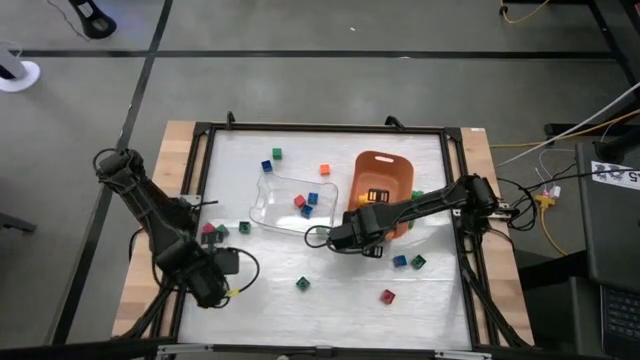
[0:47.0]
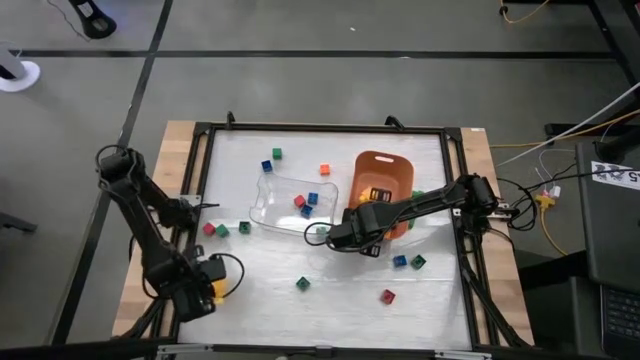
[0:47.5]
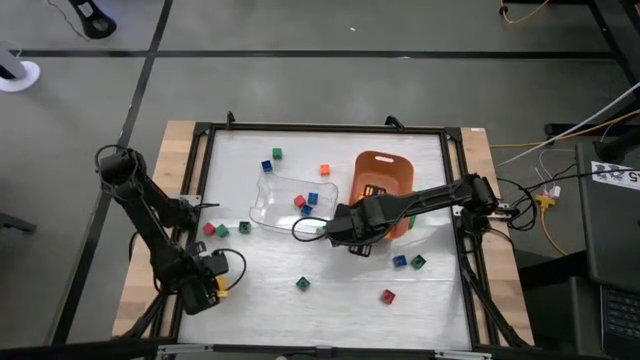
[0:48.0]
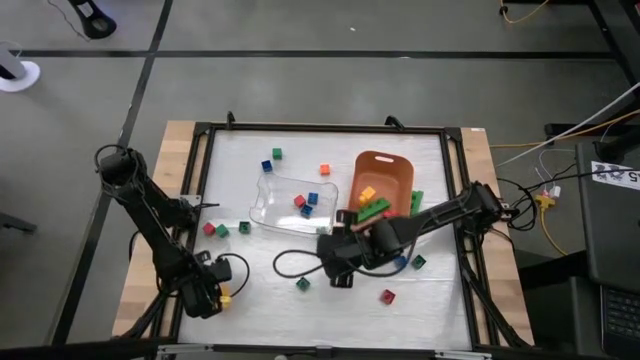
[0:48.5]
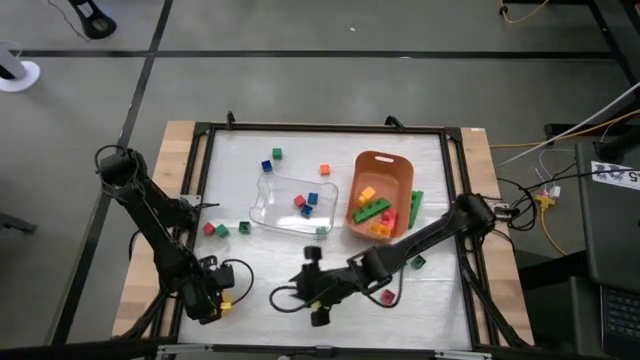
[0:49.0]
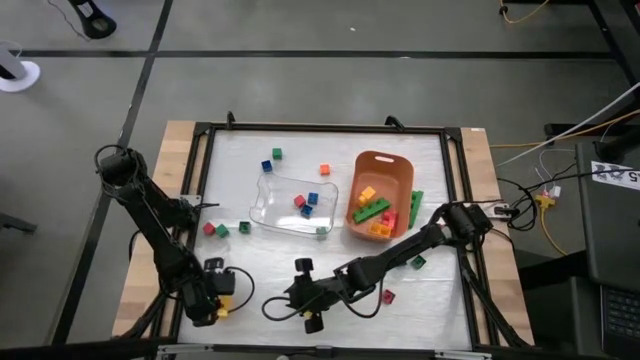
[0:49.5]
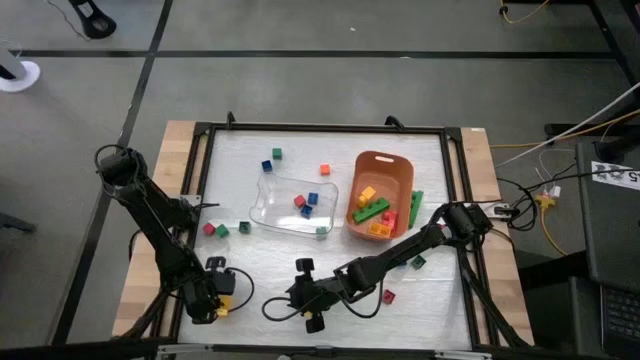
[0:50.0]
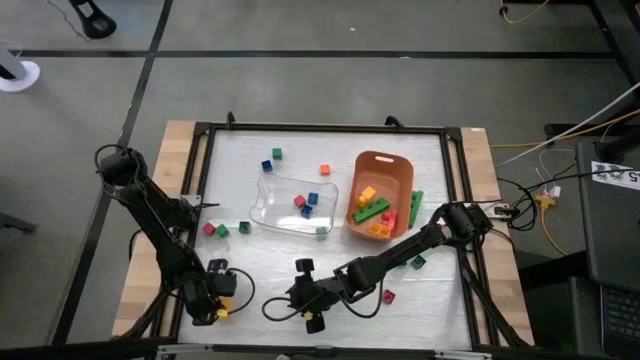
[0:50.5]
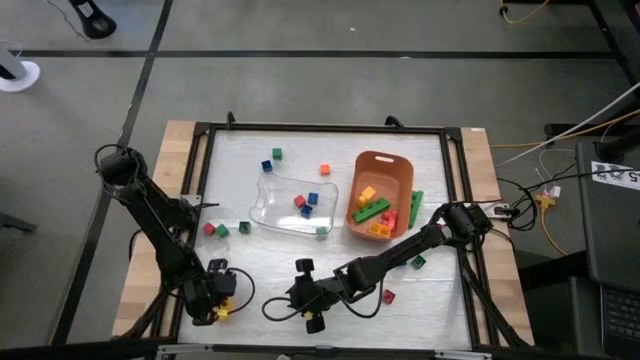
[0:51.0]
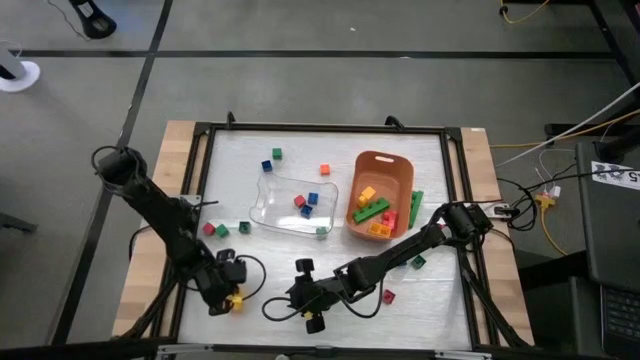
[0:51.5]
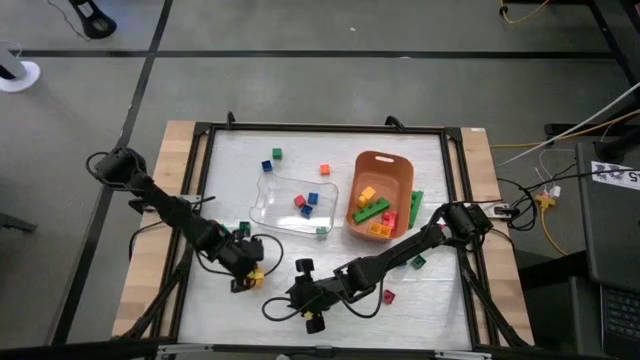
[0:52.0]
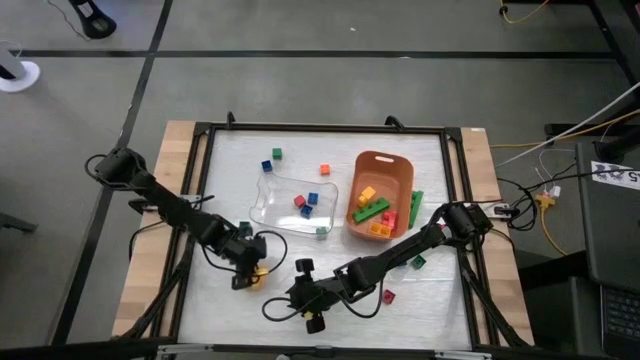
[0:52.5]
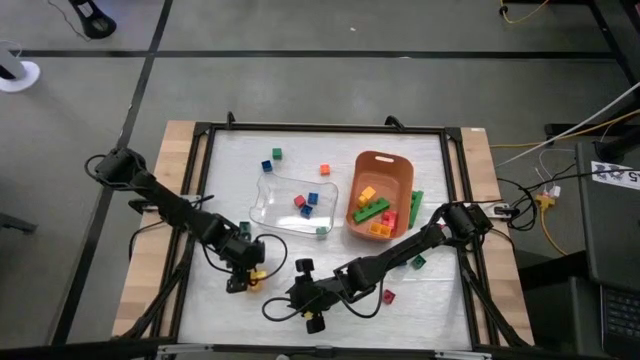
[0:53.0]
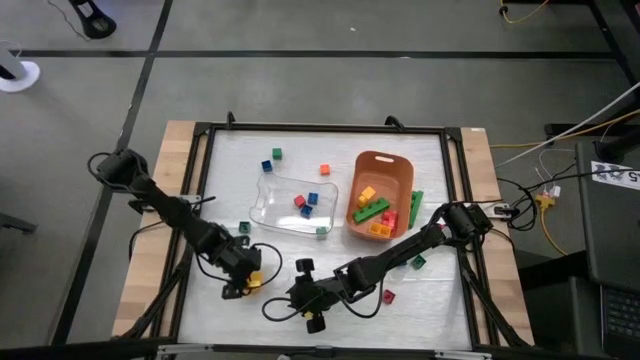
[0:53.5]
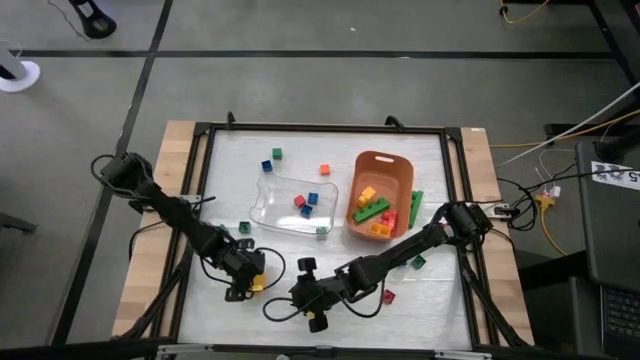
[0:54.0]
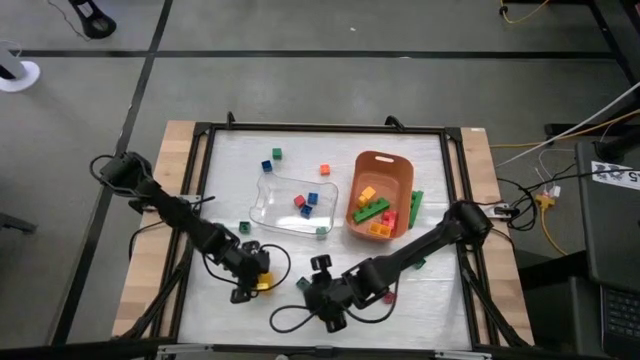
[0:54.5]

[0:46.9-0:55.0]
Task: Sort blocks by size
Put the big yellow game piece into the orange bin

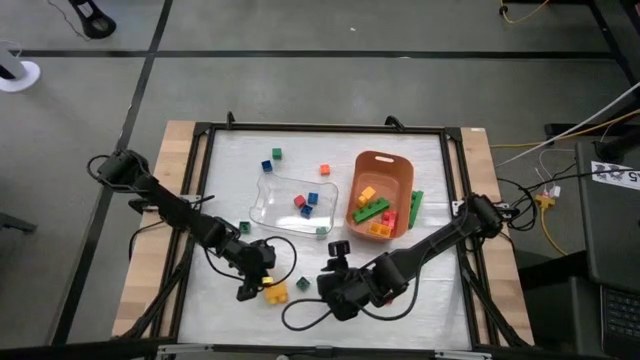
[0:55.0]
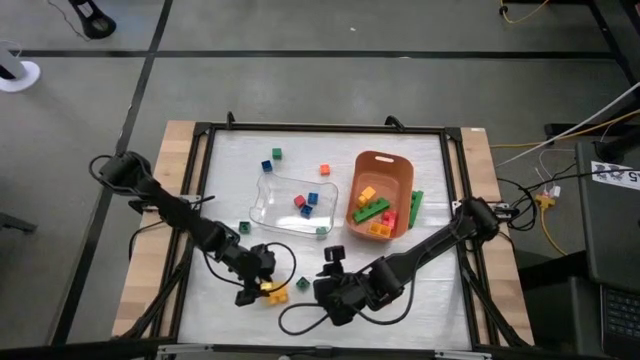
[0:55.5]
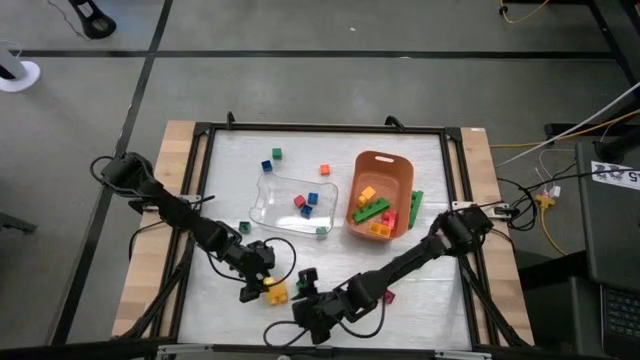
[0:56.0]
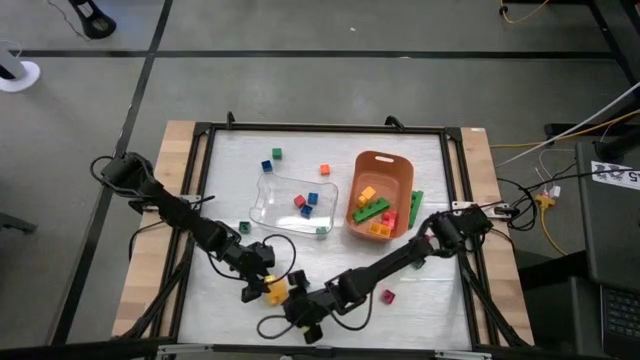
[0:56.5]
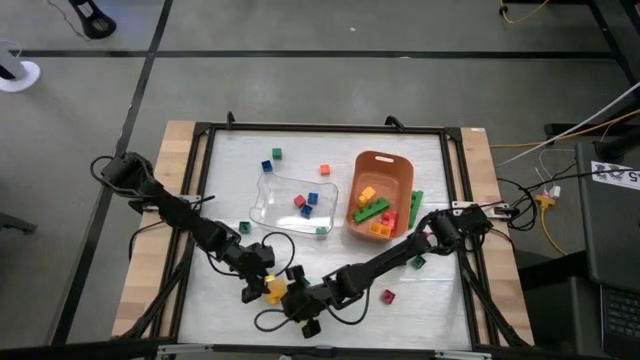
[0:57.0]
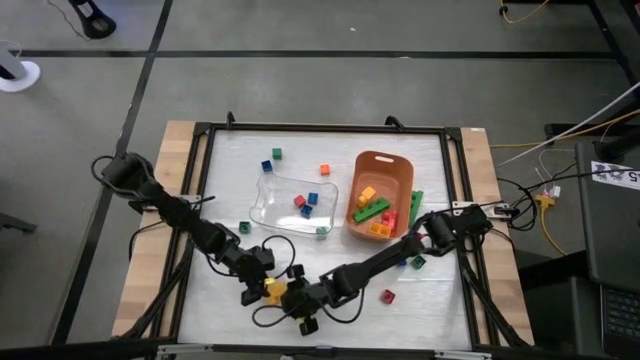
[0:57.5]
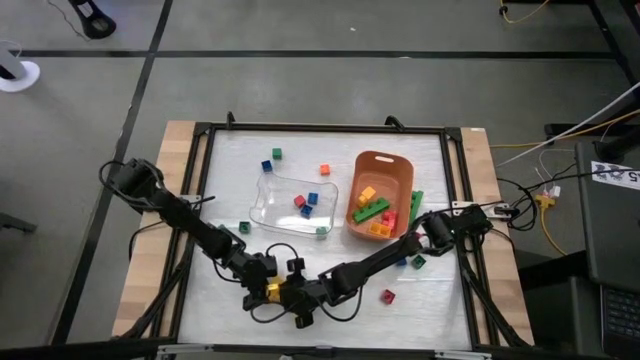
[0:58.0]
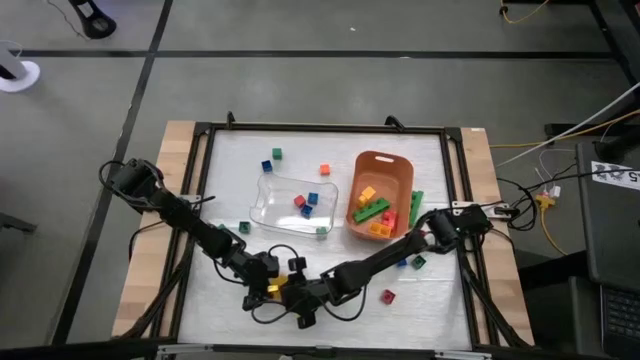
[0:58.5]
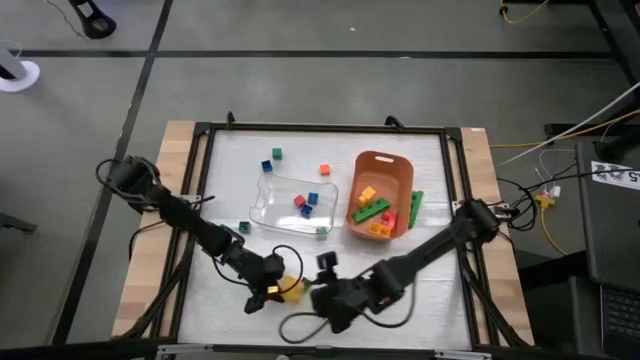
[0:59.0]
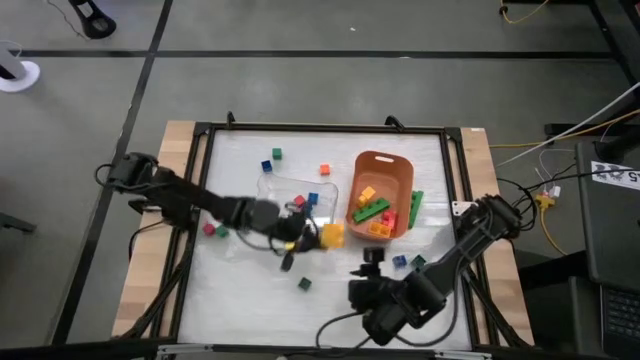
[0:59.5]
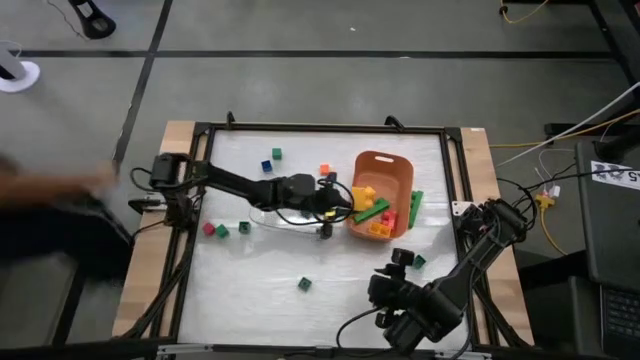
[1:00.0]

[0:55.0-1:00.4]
Put the big yellow game piece into the orange bin

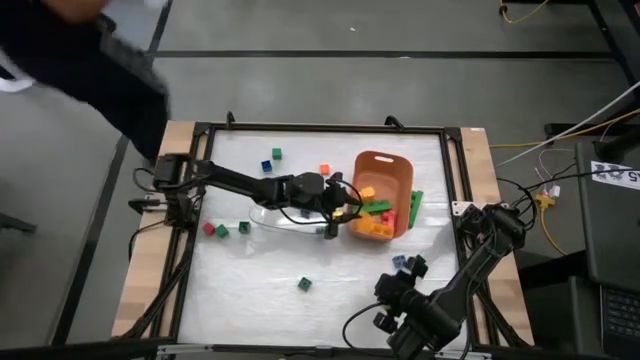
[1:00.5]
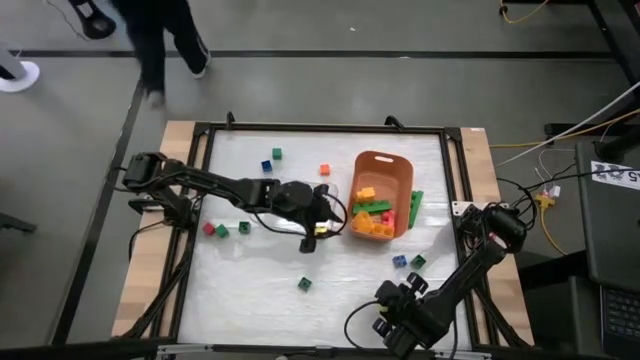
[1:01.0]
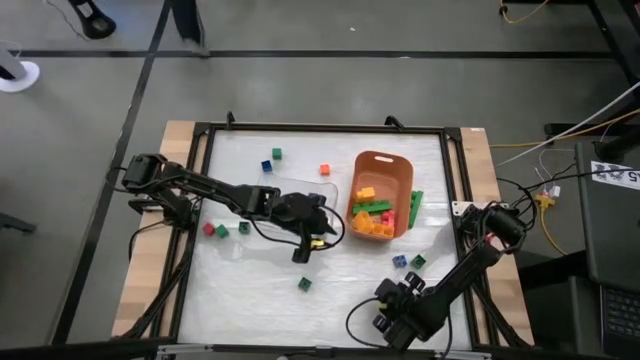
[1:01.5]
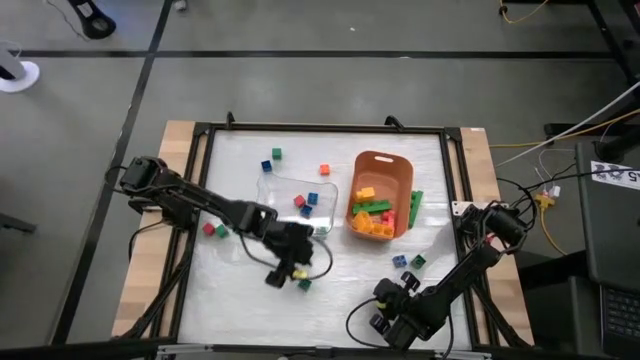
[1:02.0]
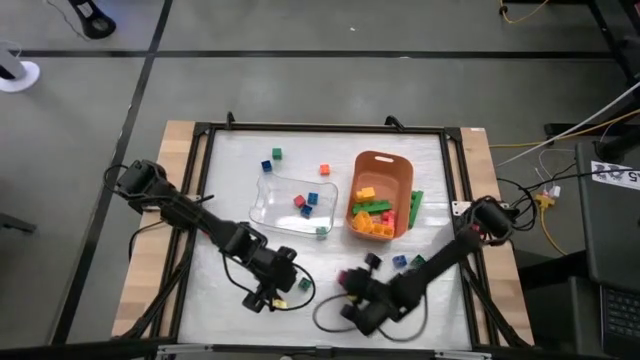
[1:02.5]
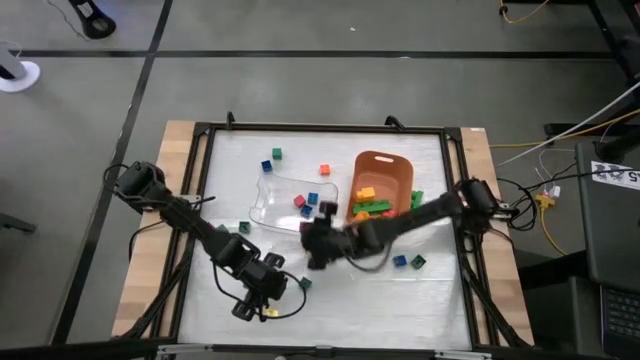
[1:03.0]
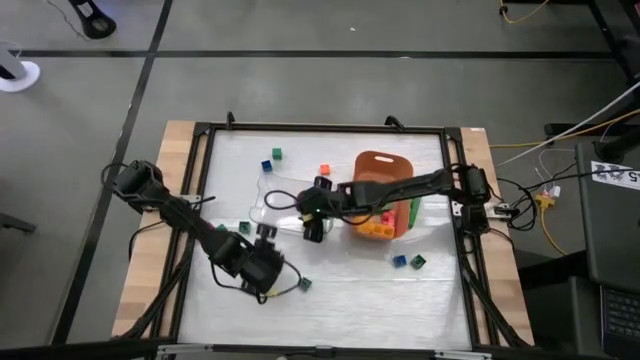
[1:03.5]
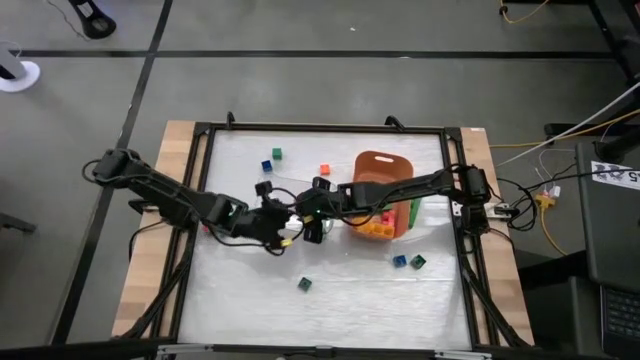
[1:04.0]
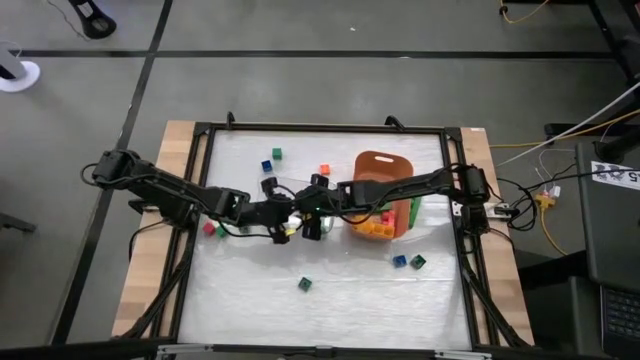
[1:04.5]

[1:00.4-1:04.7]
Put the small red game piece into the transparent bin

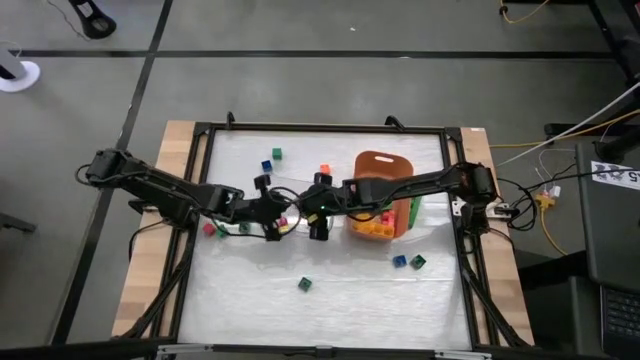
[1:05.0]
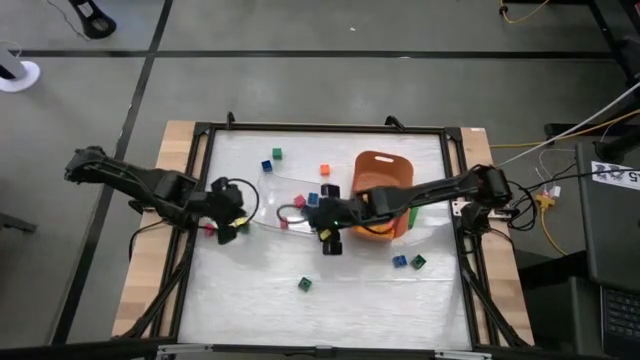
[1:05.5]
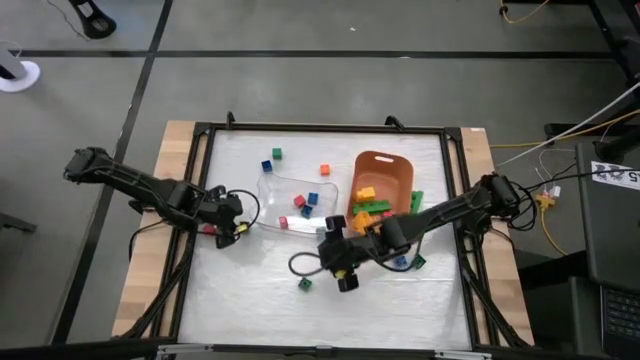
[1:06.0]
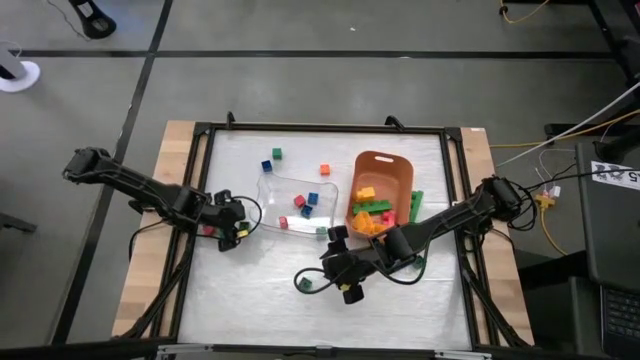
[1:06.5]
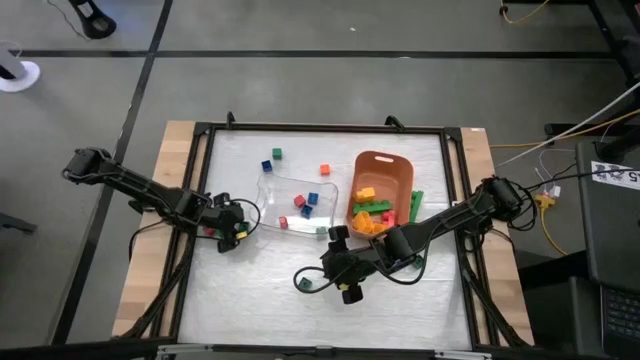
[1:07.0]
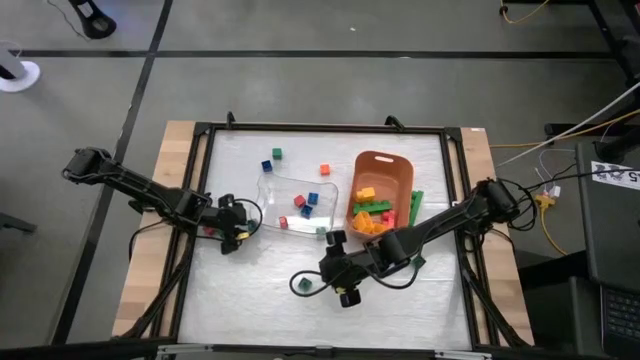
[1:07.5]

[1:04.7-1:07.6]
Put the small green game piece into the transparent bin

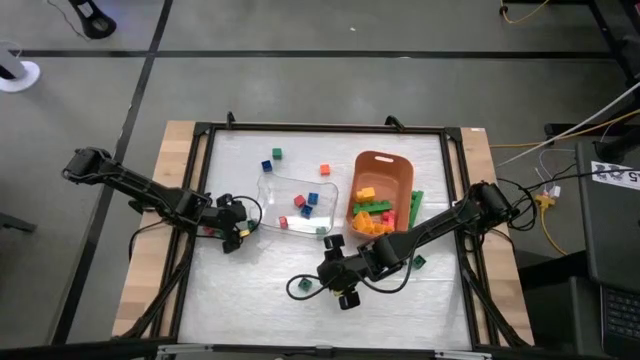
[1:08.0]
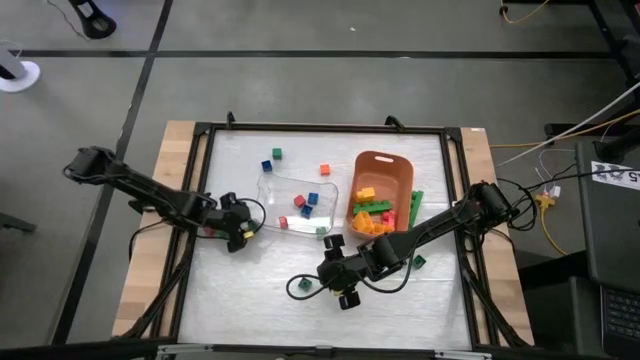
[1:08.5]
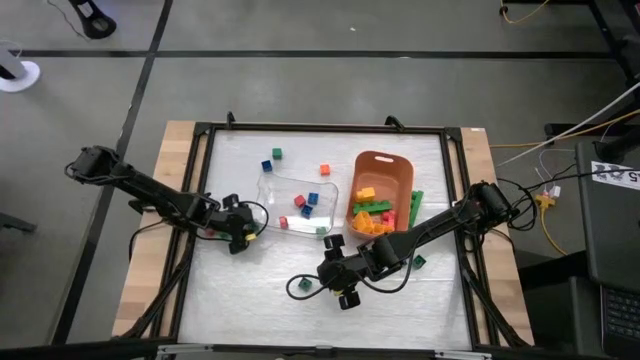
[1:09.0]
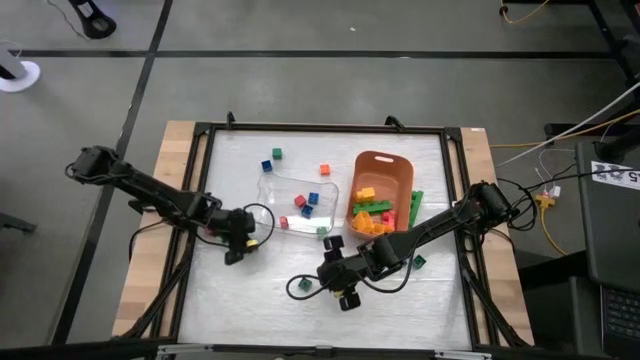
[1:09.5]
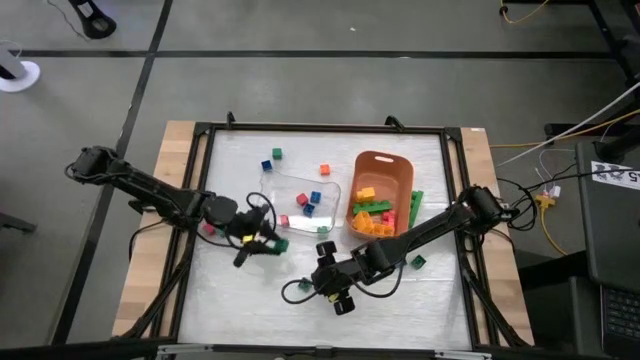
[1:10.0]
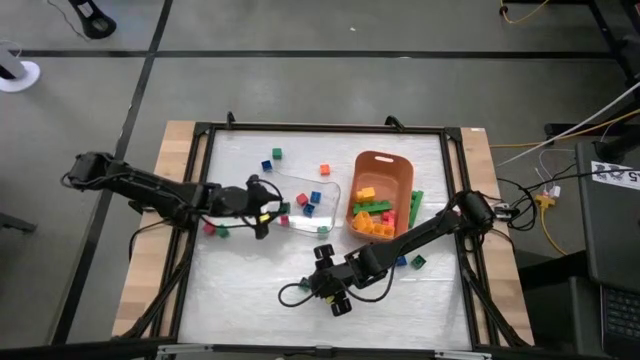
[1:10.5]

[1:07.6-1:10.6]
Put the small green game piece into the transparent bin
